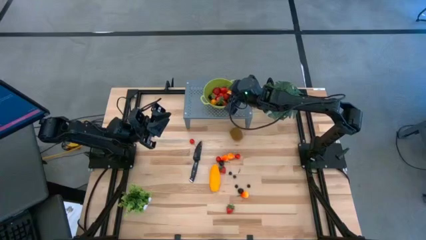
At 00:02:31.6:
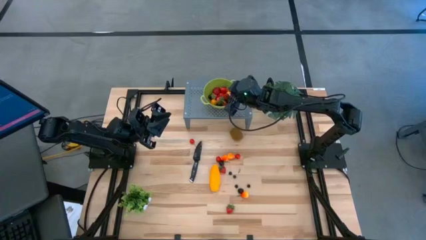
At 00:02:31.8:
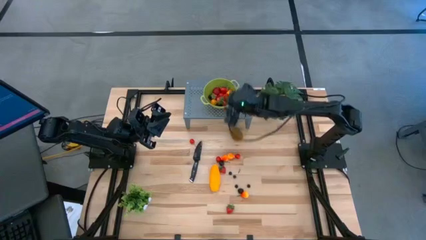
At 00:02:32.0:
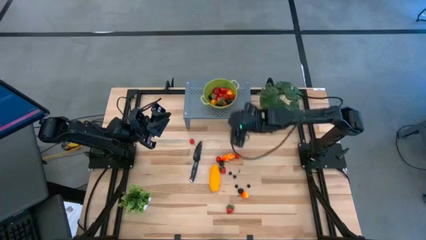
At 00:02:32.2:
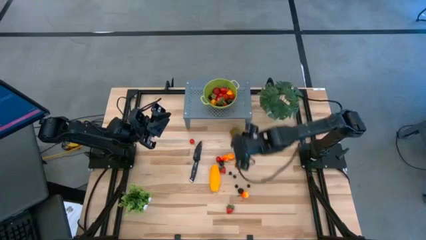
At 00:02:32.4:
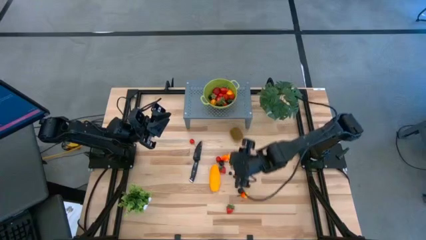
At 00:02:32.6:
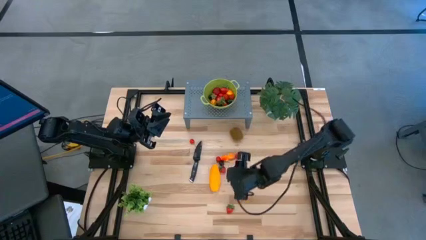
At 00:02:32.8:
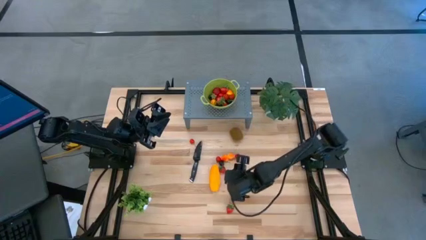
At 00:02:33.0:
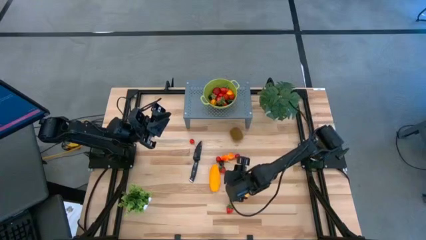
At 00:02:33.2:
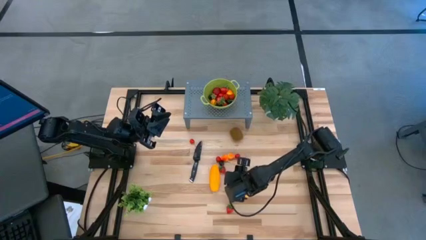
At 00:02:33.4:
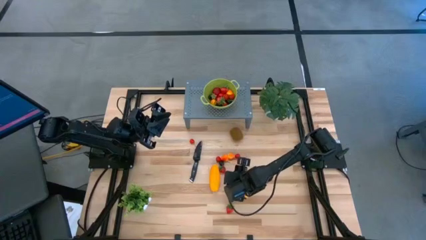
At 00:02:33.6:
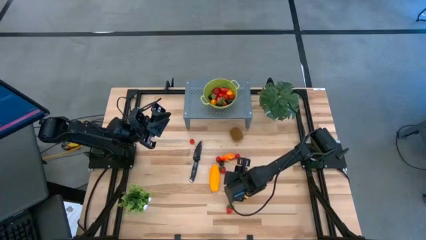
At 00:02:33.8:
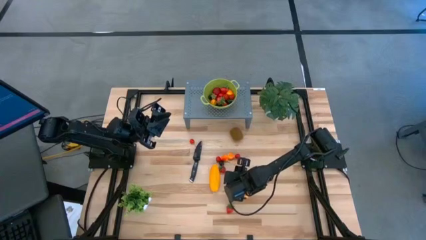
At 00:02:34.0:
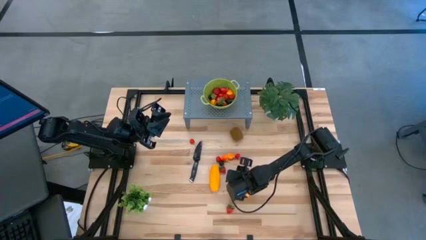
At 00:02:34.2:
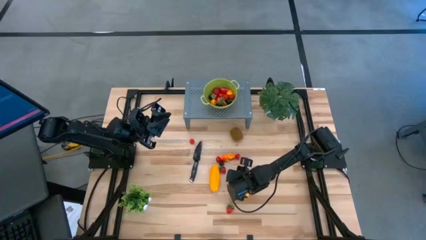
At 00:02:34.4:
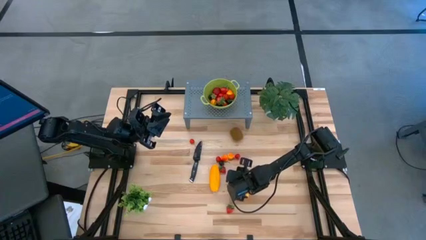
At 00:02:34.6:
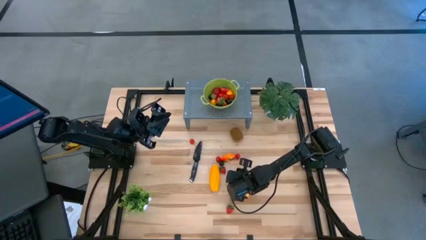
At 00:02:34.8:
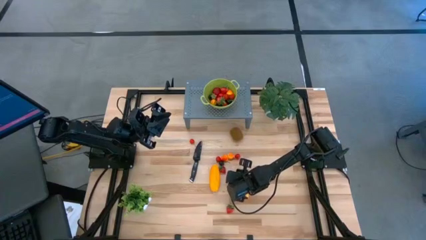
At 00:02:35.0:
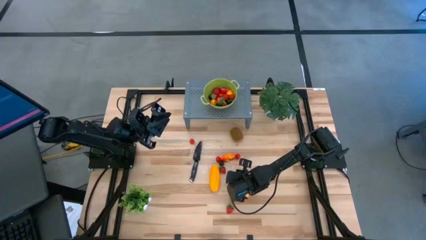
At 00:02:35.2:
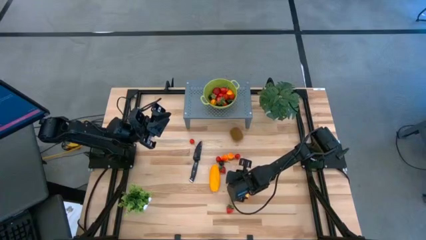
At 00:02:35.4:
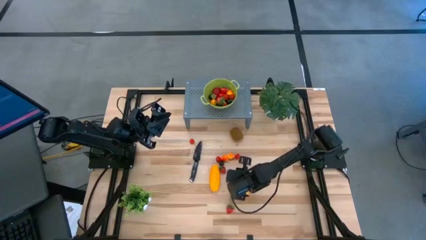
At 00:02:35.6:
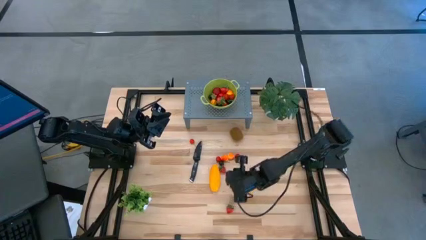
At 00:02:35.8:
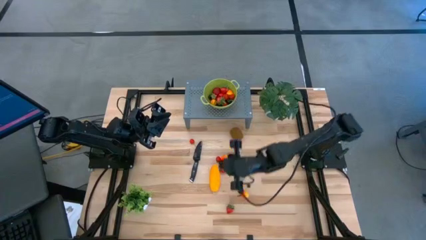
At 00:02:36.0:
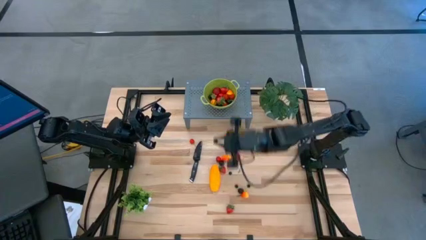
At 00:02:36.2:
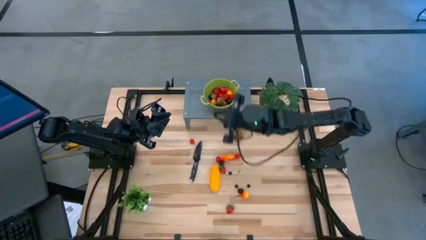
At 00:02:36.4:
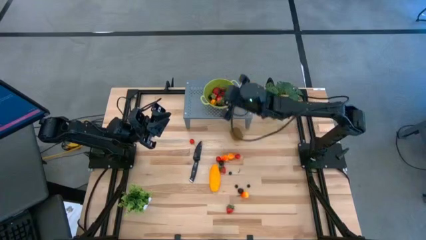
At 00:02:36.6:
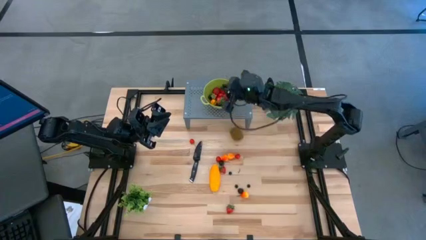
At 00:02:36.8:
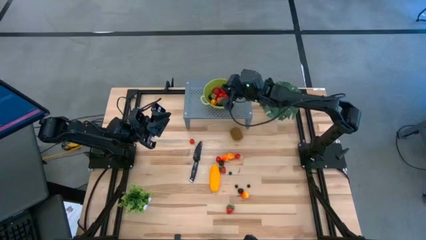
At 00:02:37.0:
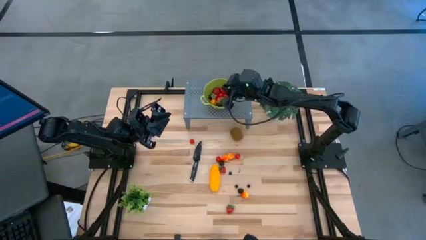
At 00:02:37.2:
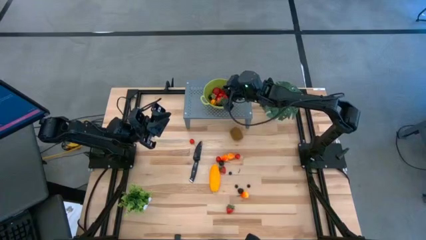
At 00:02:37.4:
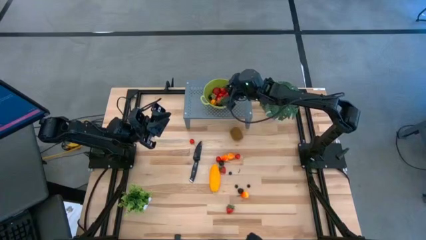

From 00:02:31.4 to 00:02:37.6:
Task: Pick & Place Fruit
Put the blueberry into the green strainer bowl on the shelf

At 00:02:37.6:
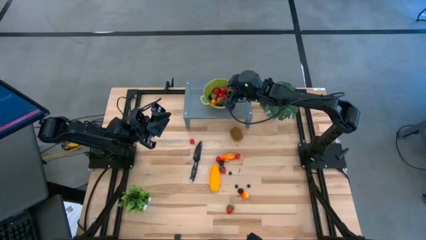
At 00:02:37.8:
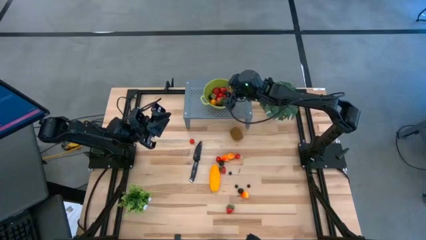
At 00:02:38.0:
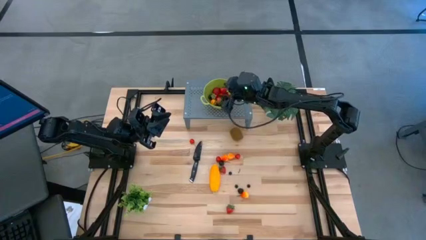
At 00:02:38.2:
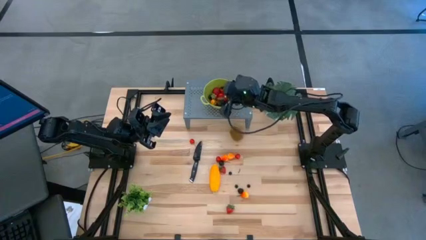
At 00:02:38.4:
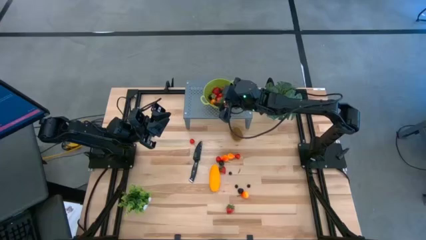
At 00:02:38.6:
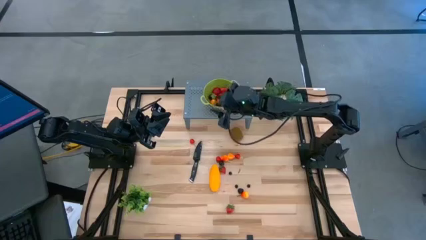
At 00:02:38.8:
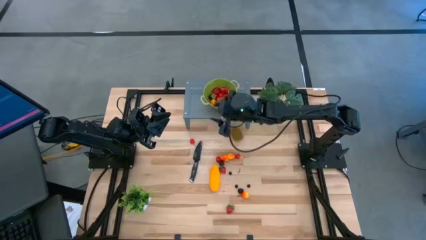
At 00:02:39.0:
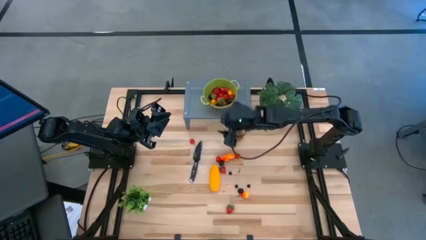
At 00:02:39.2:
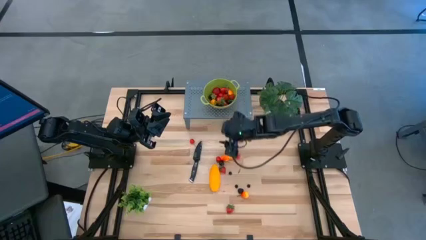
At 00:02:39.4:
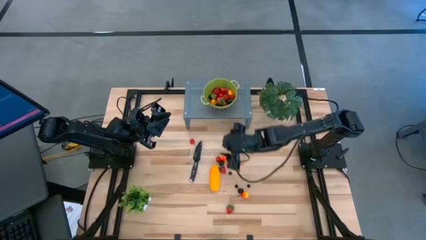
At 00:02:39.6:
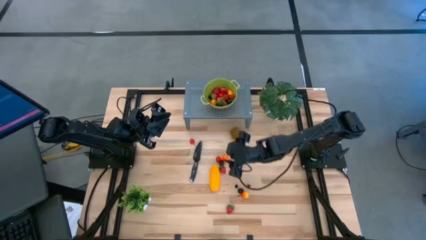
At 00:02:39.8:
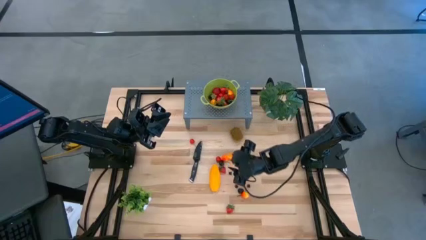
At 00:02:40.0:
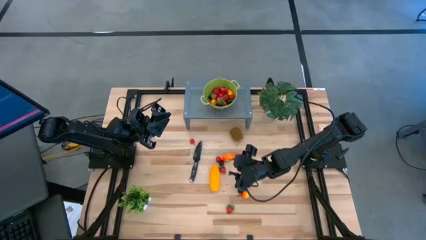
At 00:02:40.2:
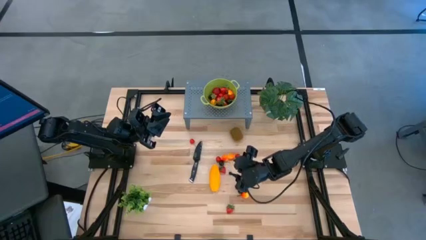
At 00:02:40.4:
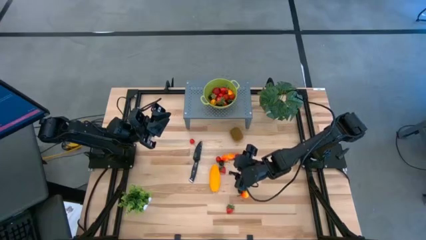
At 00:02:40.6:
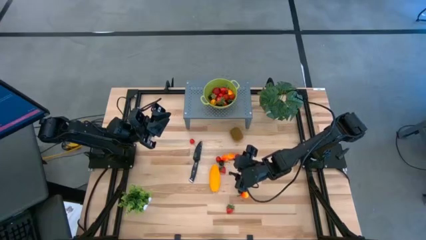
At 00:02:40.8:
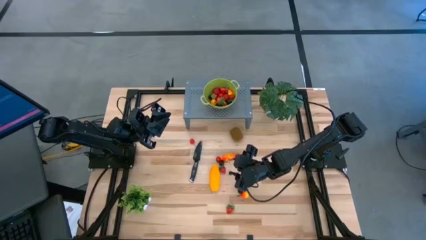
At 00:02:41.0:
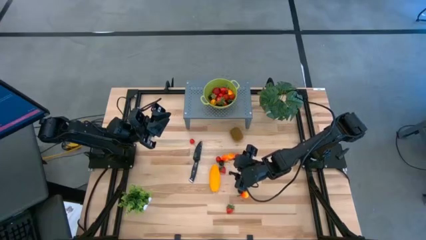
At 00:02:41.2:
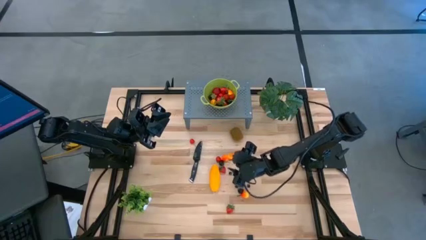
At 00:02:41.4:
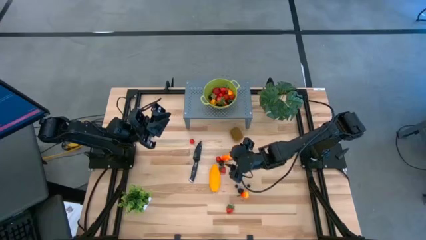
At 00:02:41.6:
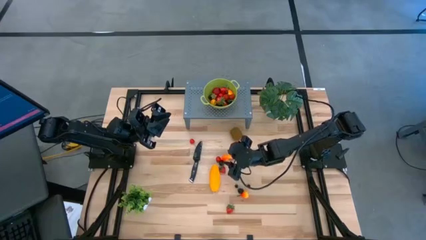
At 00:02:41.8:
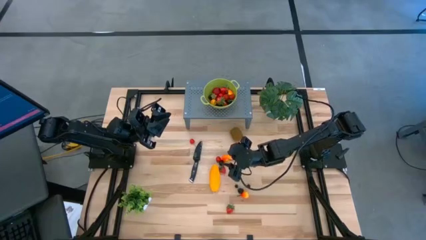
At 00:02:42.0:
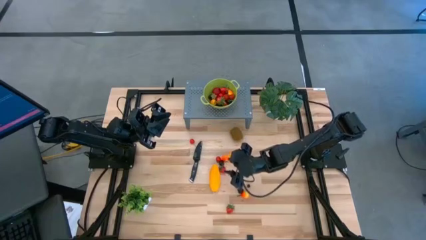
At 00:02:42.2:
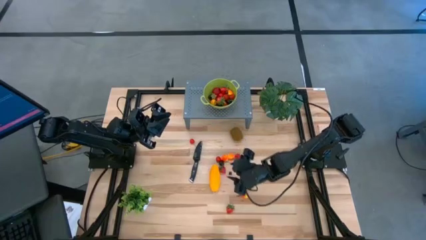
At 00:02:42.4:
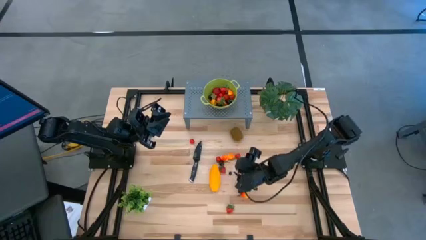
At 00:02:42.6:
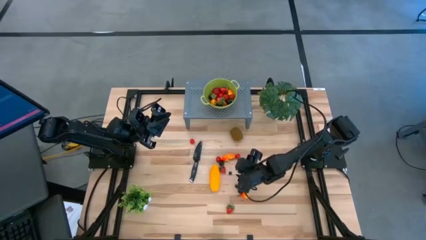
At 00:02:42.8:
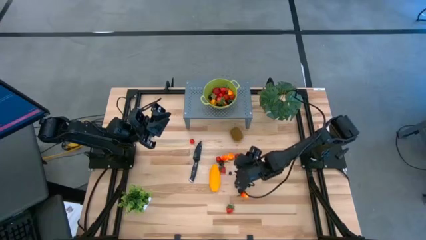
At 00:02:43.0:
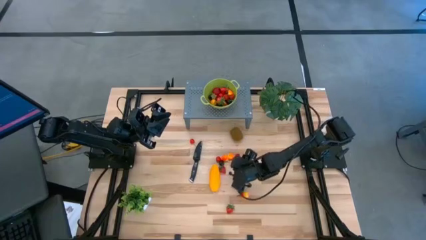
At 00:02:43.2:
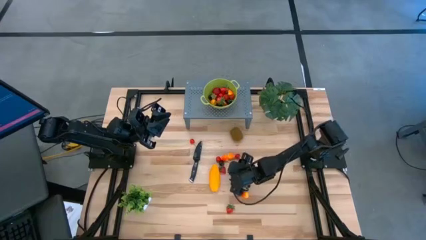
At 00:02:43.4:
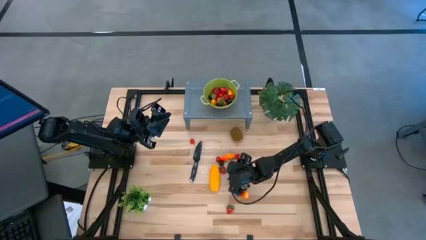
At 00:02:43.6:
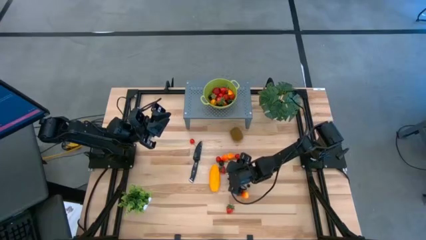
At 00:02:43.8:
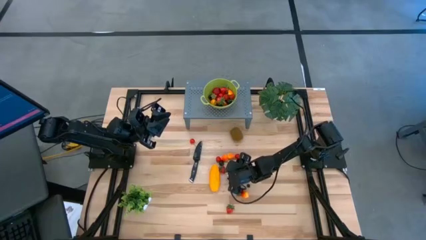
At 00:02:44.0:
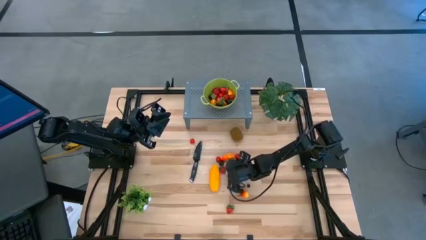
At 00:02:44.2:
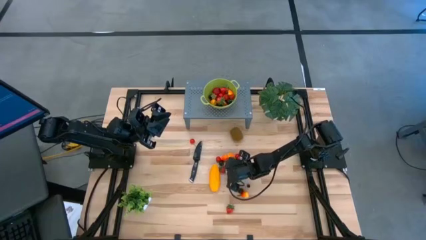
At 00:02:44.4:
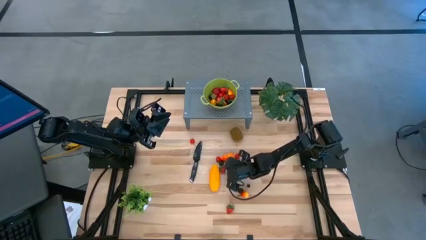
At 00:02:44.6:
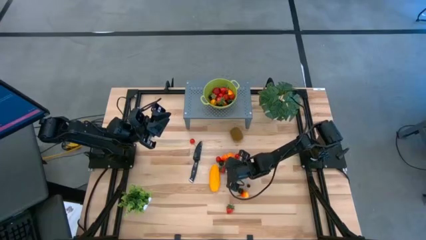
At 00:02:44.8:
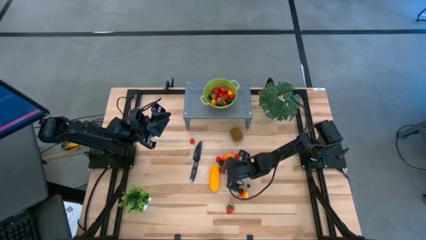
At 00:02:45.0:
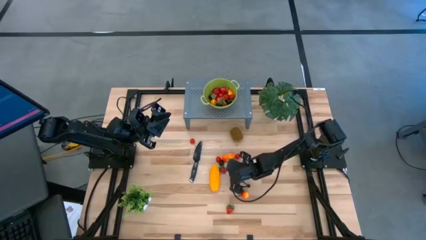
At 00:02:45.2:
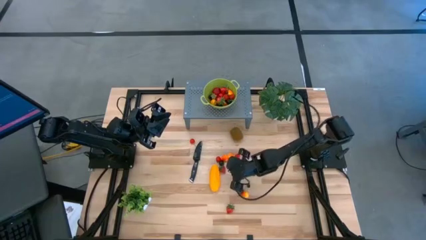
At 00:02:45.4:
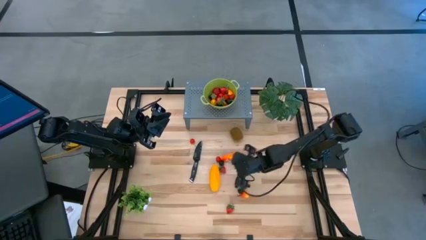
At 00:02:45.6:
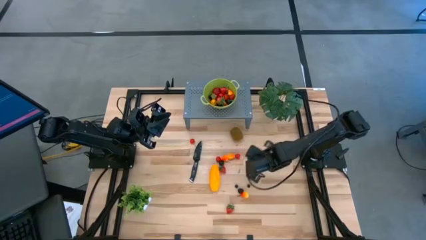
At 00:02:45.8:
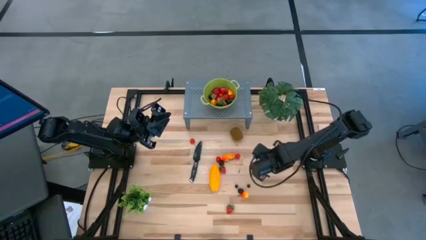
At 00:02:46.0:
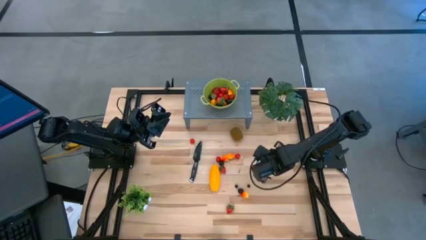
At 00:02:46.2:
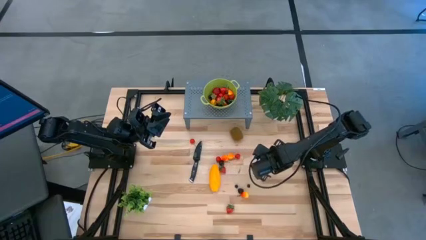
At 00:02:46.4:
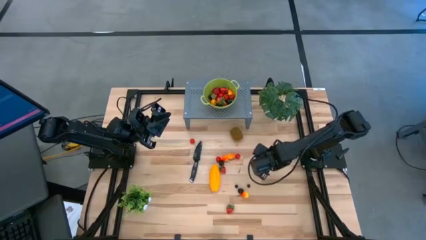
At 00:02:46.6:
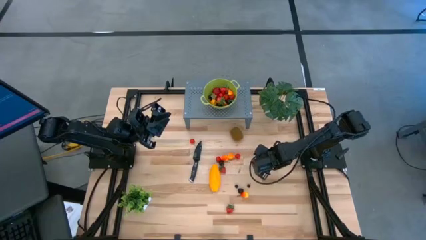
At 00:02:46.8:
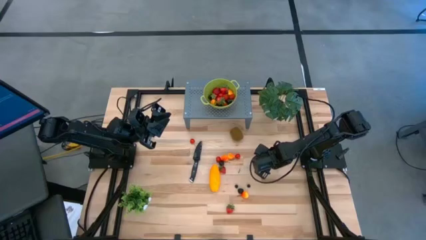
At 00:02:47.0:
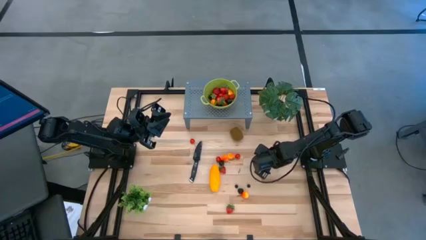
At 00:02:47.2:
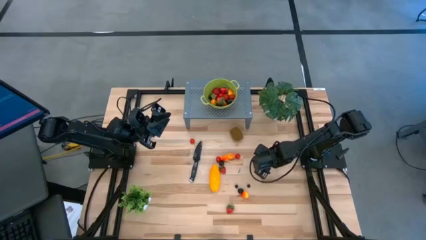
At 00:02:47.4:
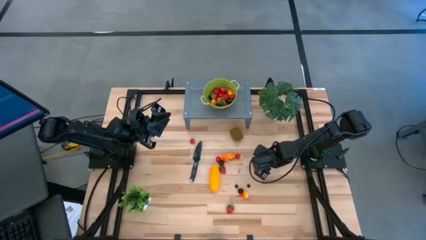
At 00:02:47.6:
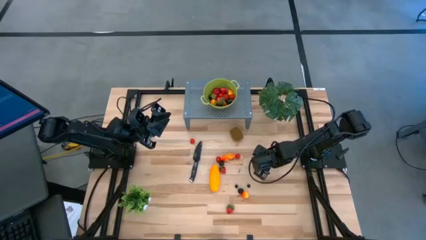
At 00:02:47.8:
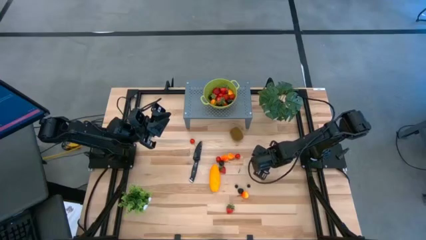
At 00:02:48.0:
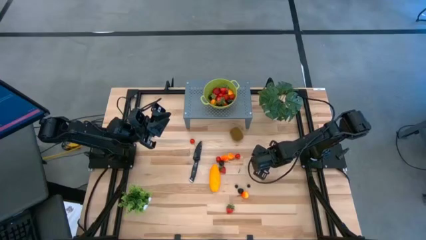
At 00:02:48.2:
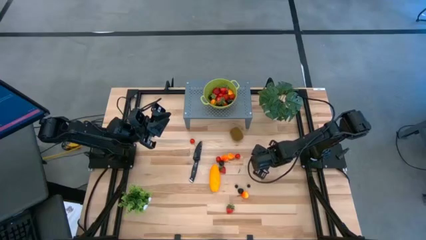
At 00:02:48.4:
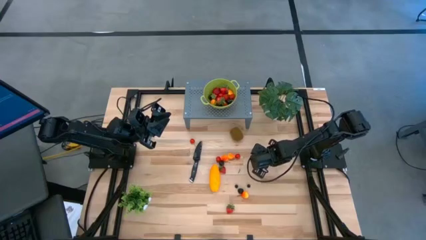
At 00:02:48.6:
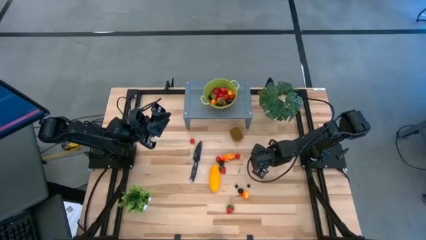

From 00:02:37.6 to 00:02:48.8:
Put the blueberry into the green strainer bowl on the shelf
